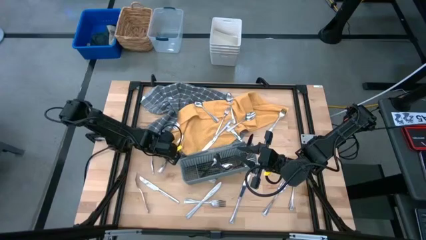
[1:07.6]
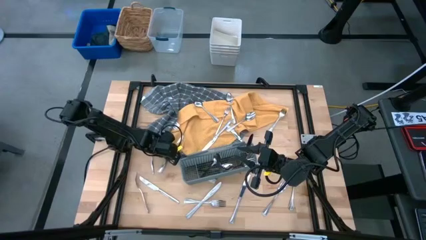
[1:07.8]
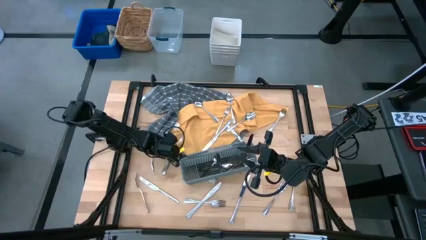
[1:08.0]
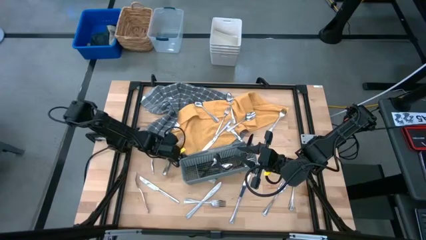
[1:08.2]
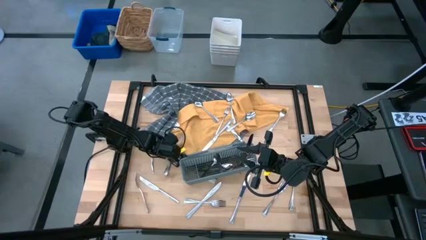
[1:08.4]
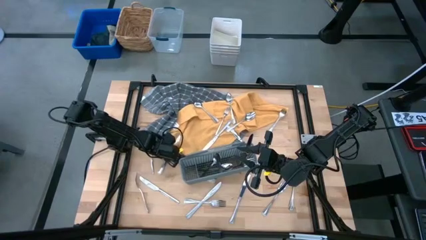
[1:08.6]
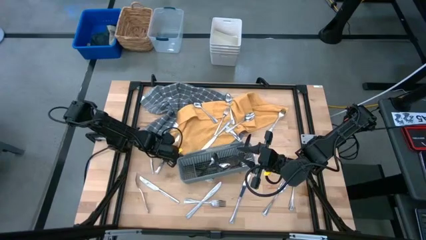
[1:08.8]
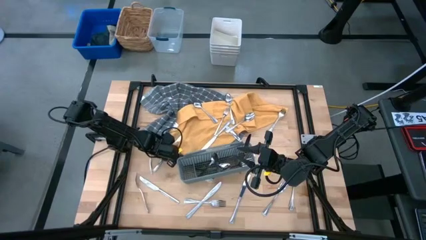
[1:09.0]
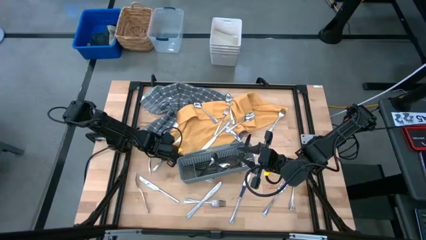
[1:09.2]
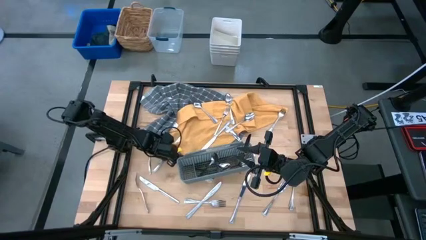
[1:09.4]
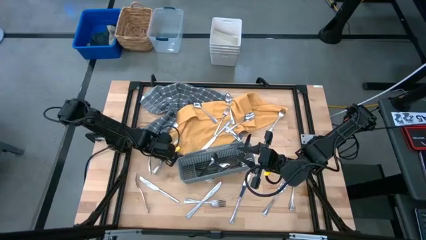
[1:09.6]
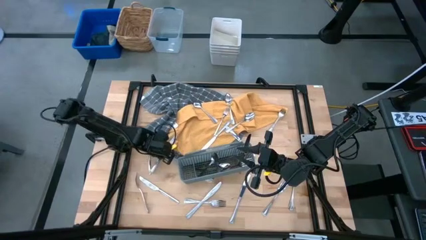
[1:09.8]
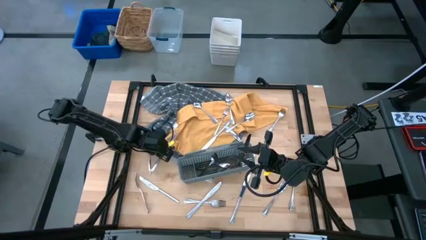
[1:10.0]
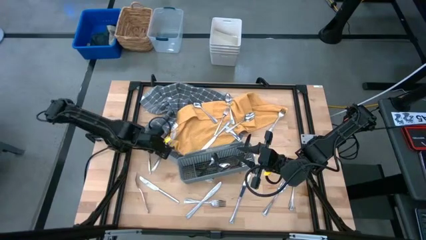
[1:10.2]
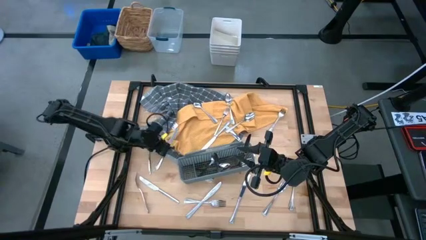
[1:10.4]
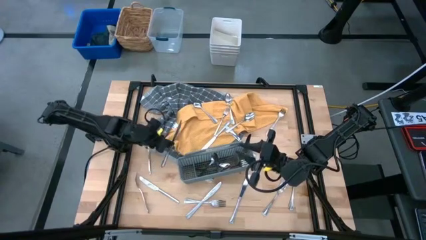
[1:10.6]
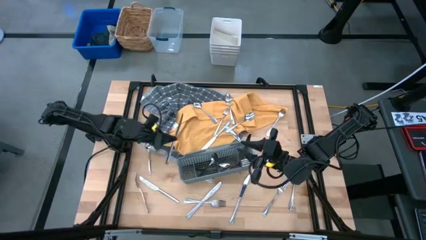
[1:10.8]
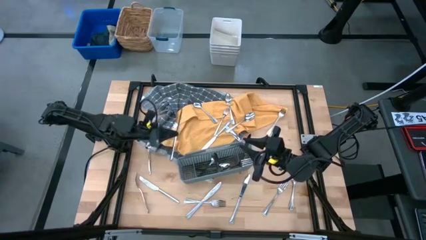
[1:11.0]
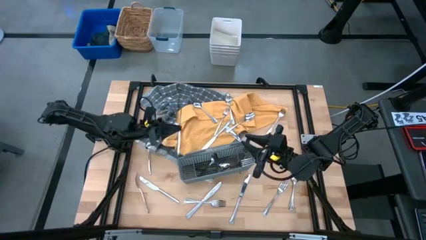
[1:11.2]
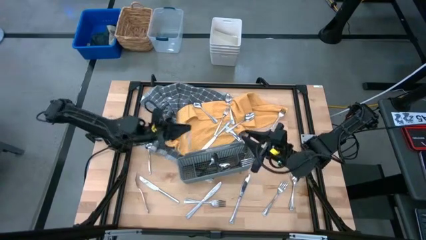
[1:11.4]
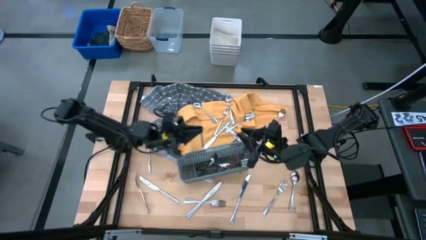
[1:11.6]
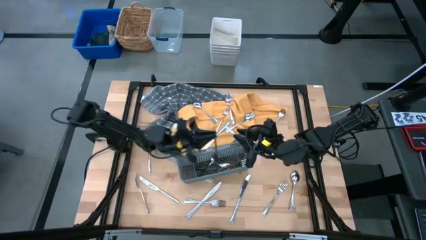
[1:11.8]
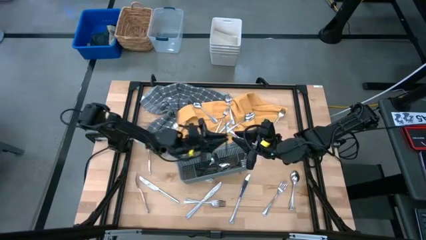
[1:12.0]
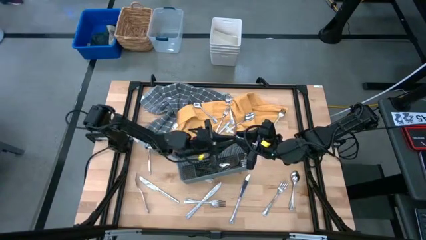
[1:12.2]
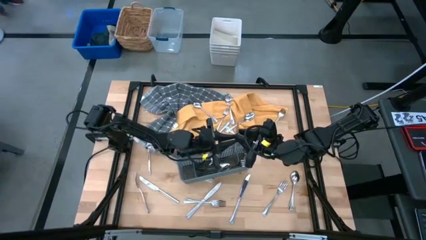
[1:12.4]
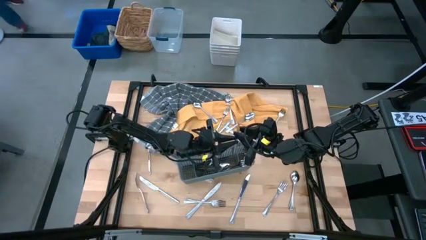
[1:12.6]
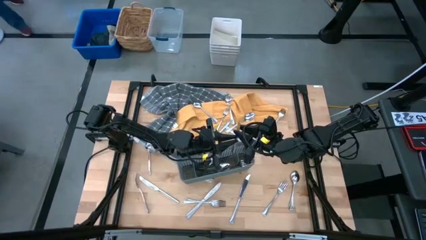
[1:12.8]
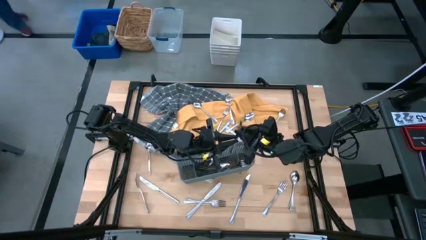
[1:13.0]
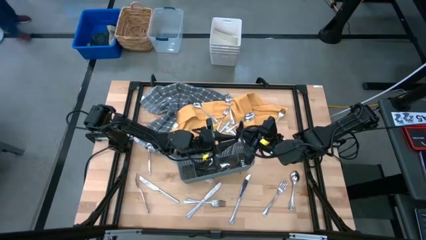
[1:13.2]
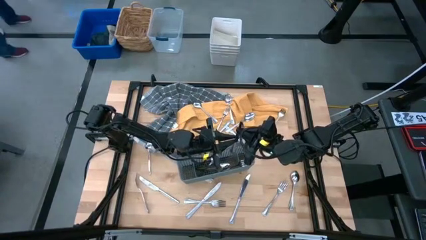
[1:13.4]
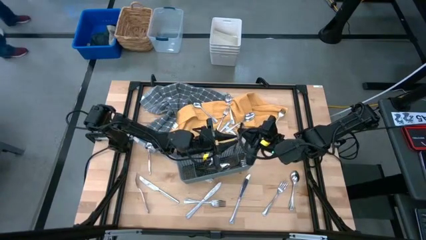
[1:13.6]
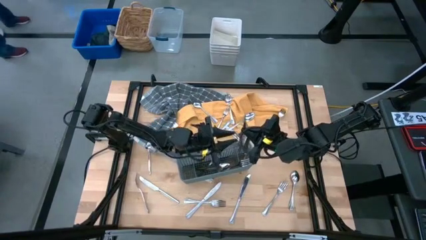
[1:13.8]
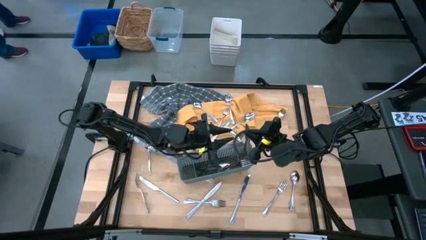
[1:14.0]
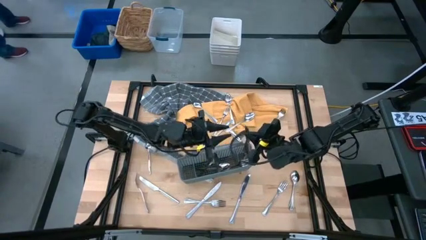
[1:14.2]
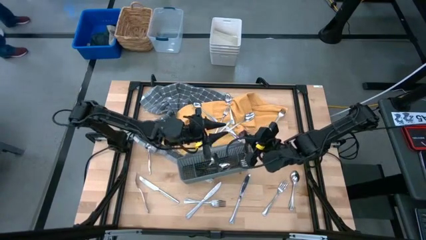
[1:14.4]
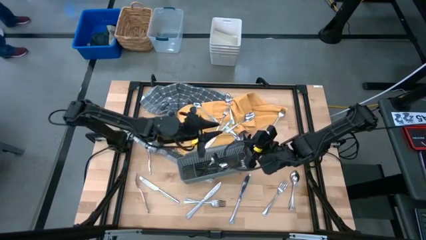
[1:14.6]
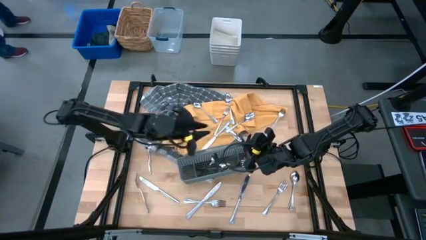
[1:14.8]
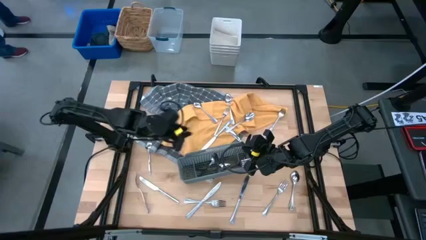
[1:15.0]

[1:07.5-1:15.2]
Task: Sort silverware
Put the silver knife into the gray silverware basket

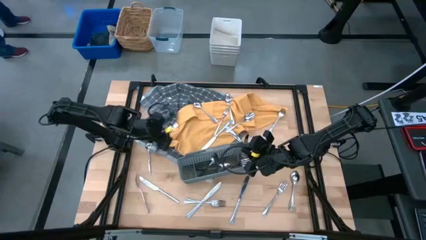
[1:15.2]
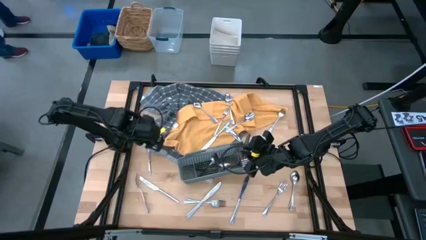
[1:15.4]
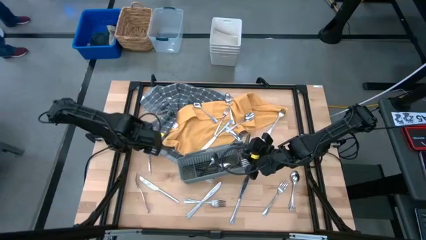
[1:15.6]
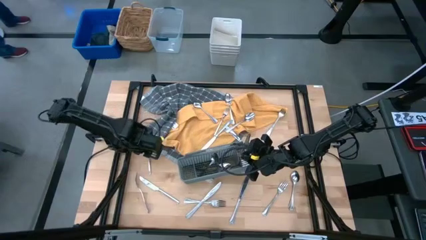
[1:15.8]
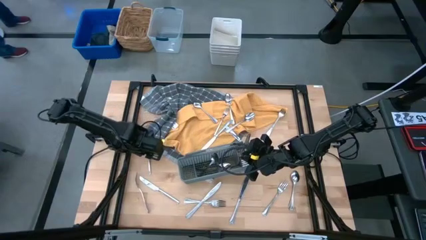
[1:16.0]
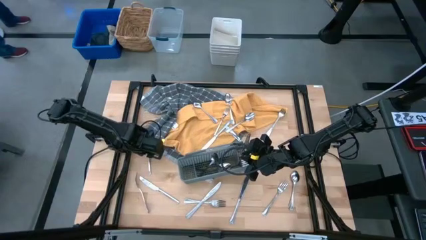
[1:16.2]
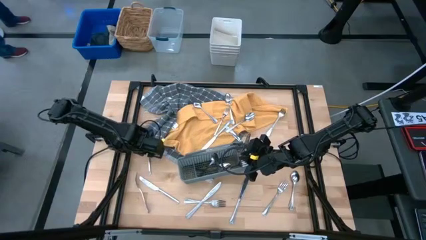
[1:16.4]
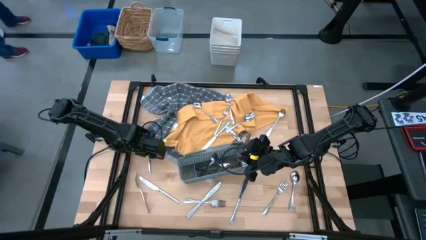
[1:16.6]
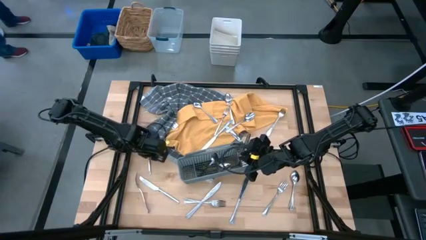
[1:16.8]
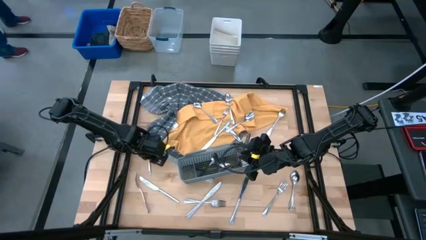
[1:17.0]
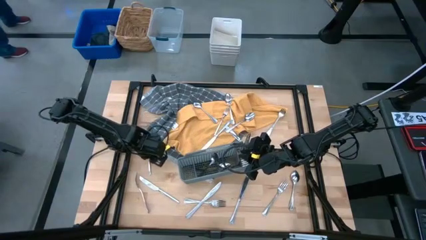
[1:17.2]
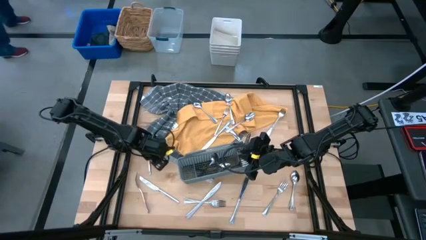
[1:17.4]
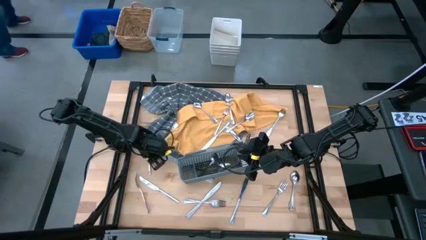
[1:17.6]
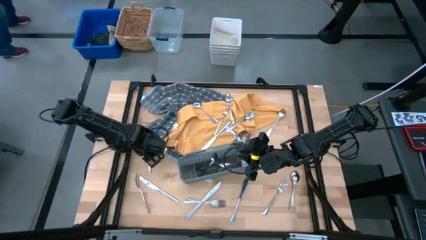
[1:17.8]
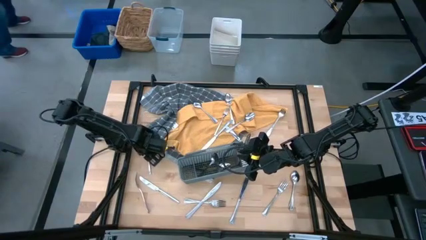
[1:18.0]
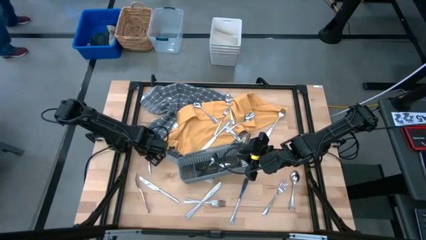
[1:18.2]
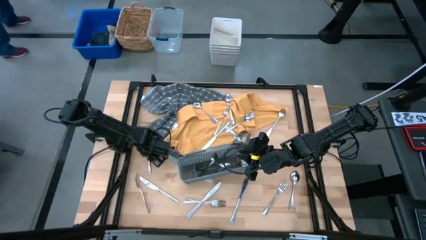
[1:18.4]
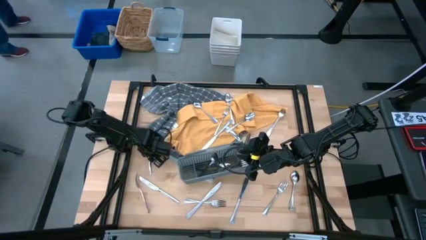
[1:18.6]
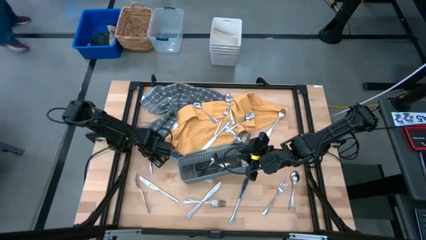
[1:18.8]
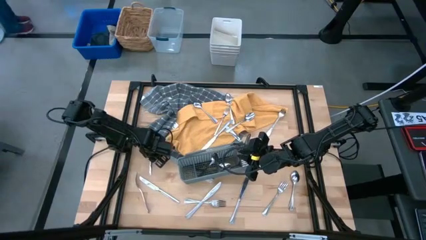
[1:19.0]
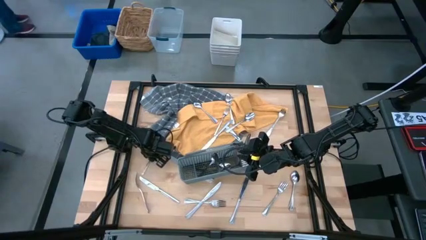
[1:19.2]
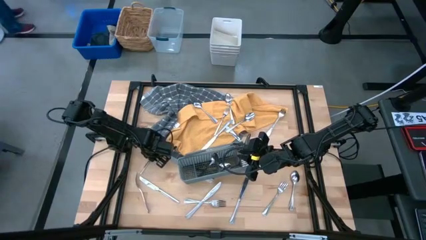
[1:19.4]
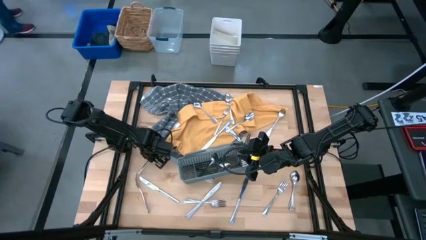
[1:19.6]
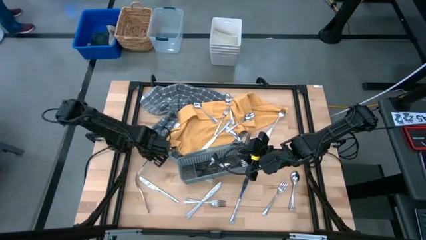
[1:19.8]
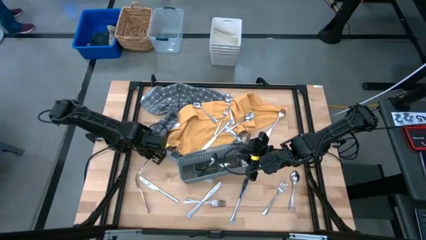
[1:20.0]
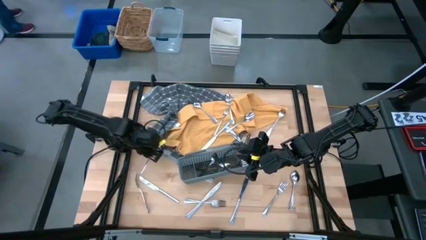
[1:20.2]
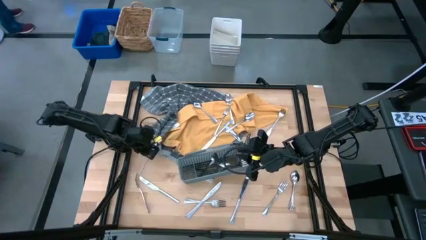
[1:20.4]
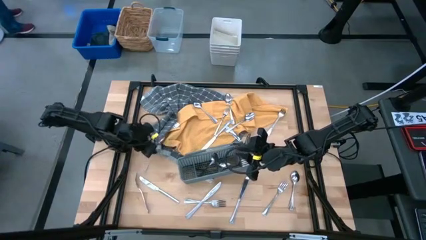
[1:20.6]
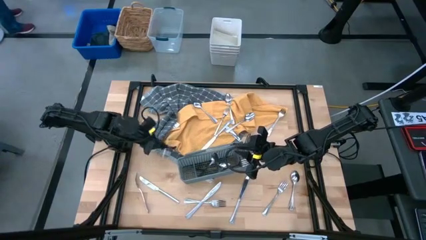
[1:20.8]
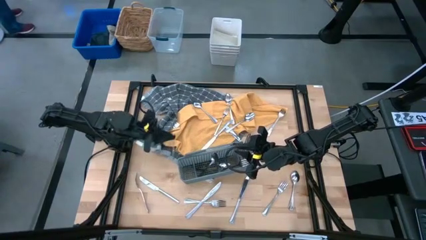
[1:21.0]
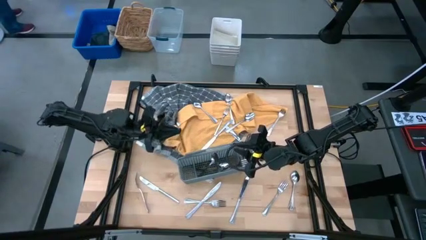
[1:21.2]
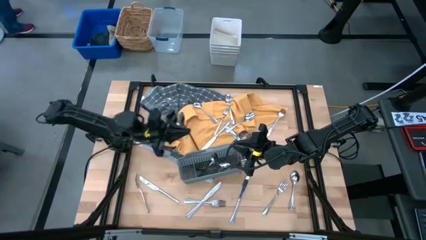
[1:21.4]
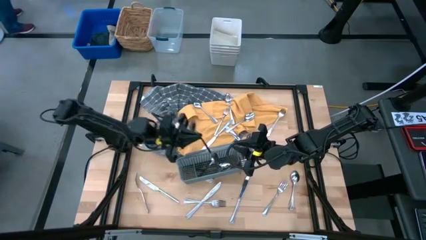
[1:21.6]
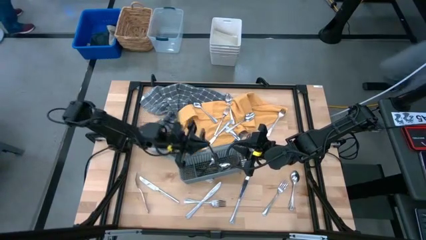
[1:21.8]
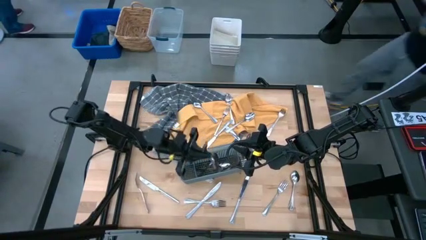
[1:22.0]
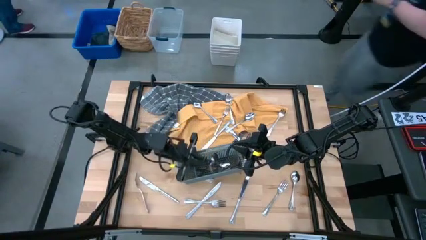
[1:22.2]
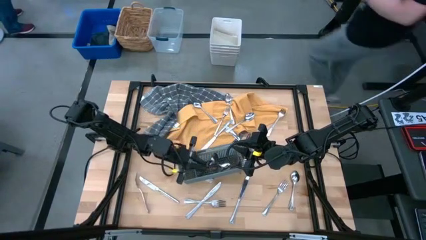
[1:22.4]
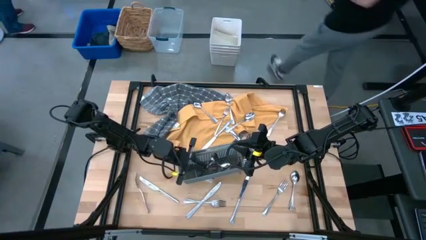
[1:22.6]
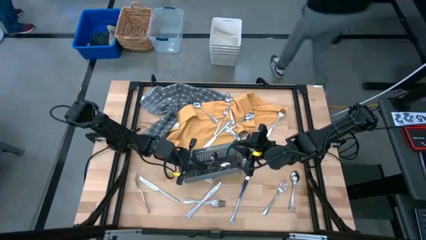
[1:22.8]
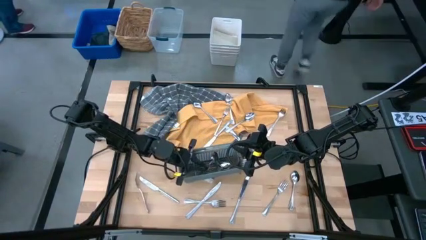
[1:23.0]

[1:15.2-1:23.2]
Put the silver spoon into the gray silverware basket

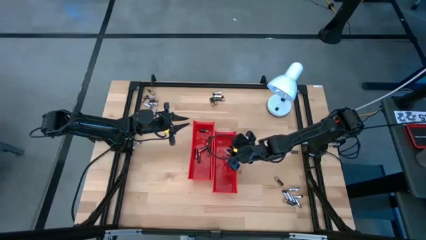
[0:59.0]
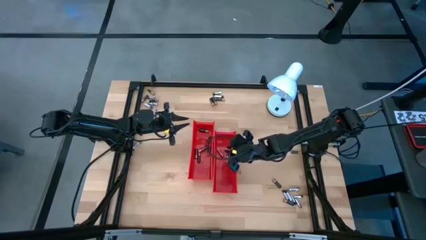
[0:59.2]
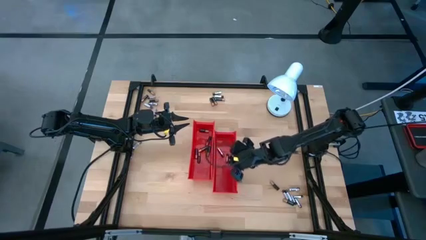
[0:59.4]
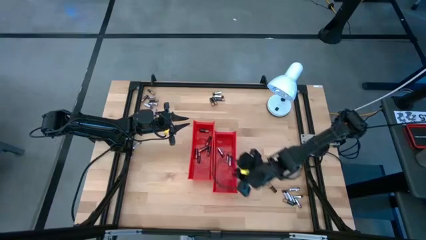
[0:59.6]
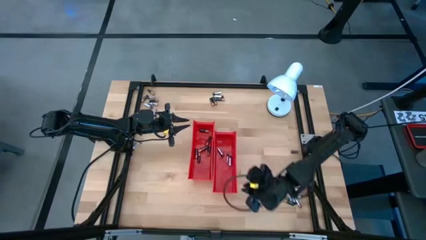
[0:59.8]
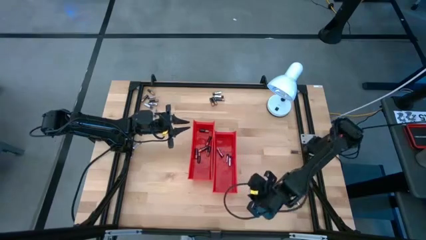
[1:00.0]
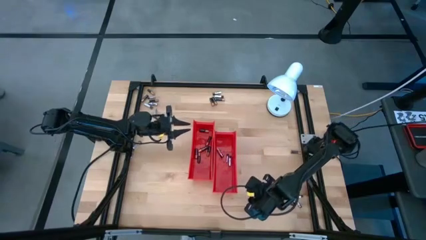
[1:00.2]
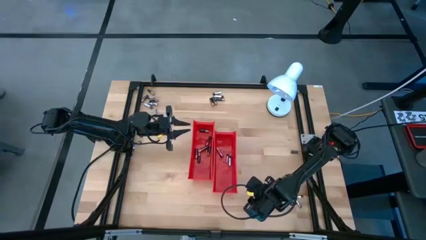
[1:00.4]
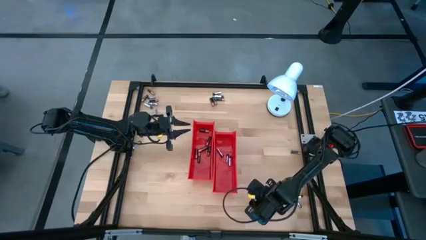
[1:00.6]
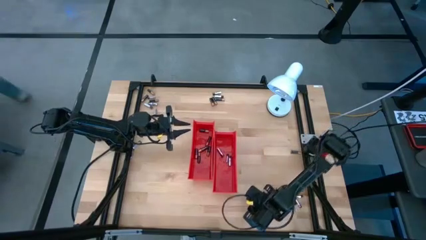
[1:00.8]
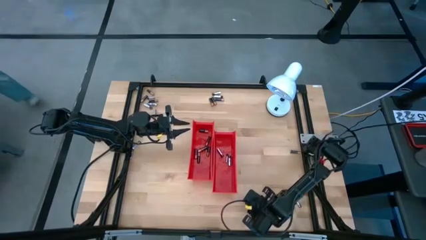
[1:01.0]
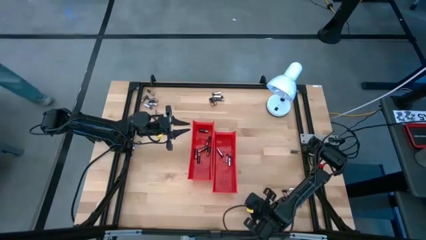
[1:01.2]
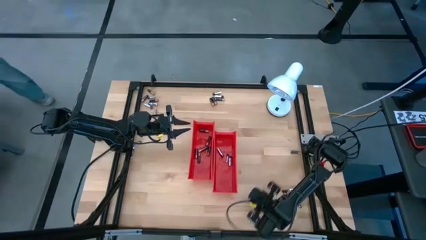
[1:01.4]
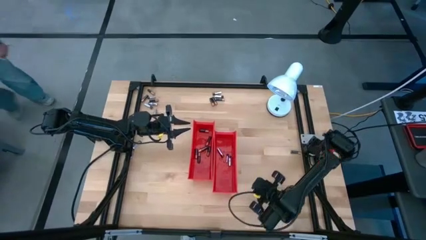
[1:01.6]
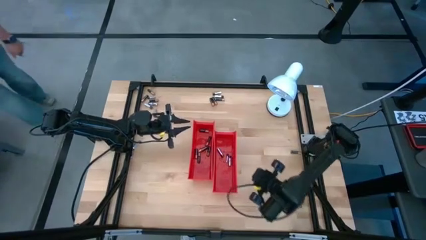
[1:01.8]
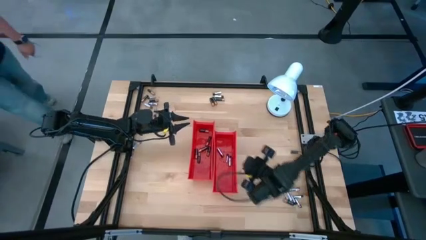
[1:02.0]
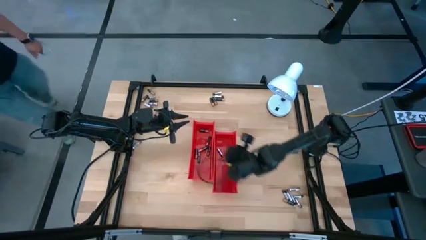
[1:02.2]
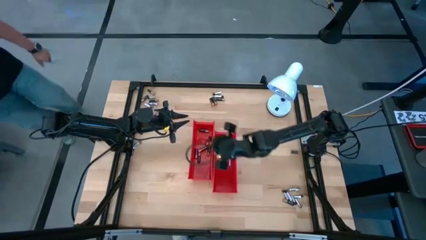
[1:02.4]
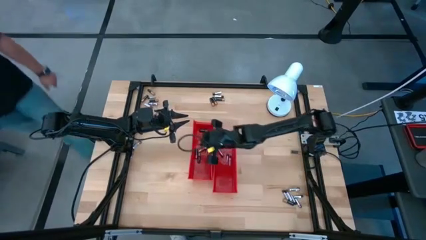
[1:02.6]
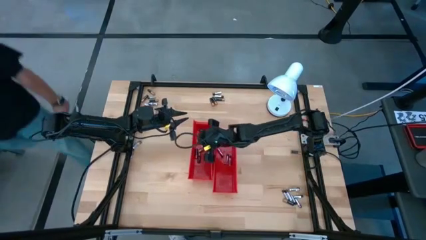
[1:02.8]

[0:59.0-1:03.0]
Task: Sort batteries
Put the black battery into the left red bin
